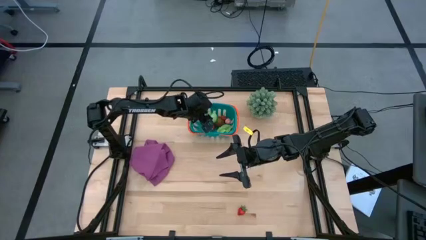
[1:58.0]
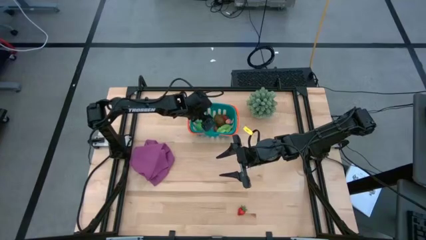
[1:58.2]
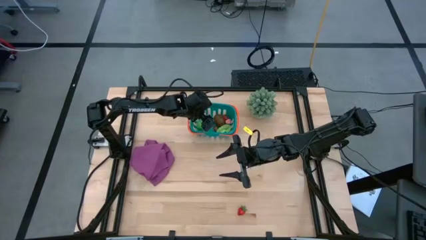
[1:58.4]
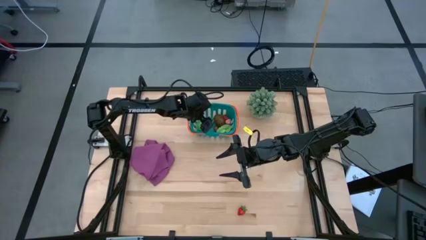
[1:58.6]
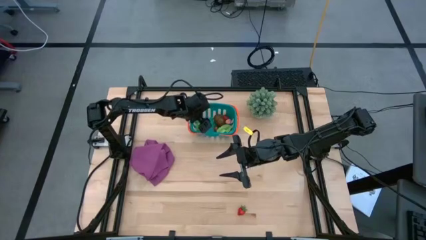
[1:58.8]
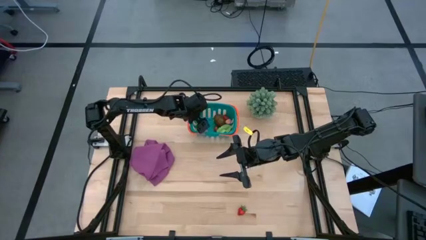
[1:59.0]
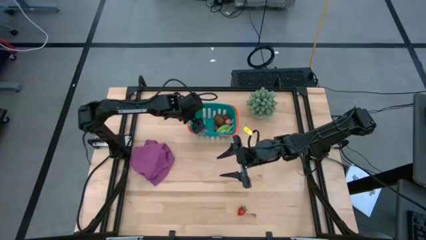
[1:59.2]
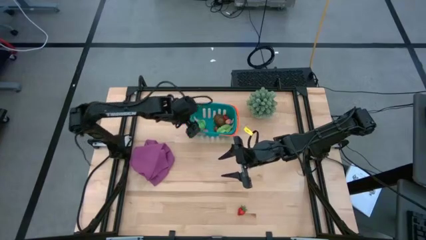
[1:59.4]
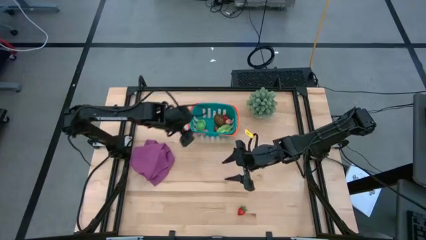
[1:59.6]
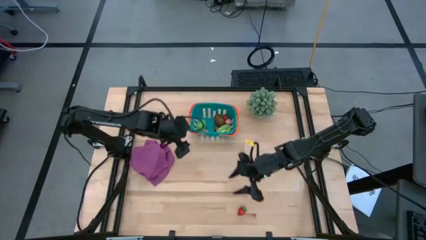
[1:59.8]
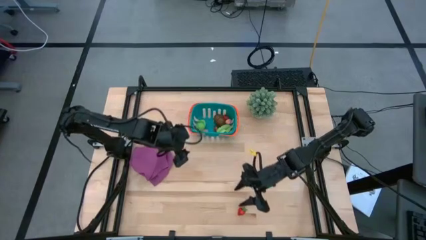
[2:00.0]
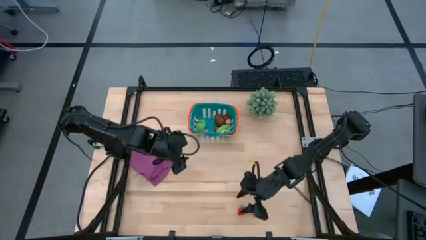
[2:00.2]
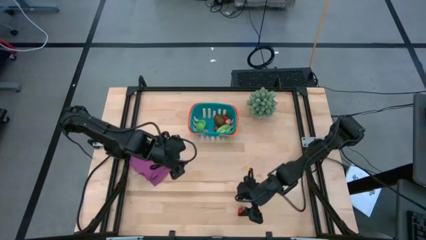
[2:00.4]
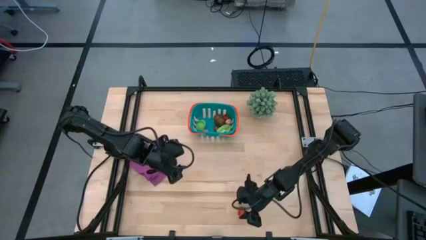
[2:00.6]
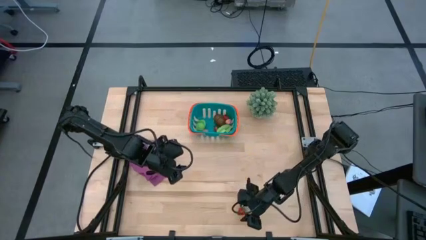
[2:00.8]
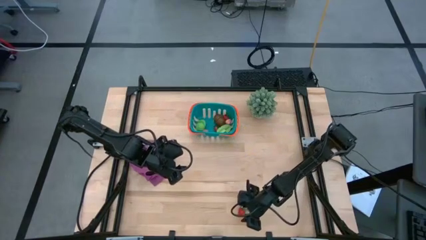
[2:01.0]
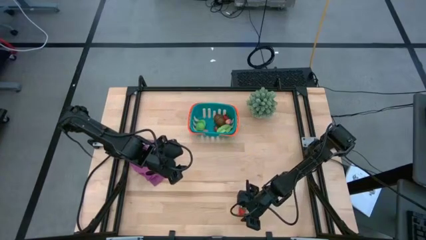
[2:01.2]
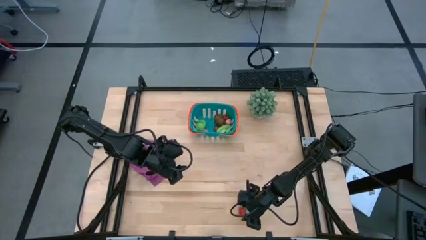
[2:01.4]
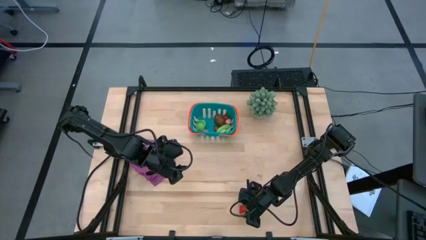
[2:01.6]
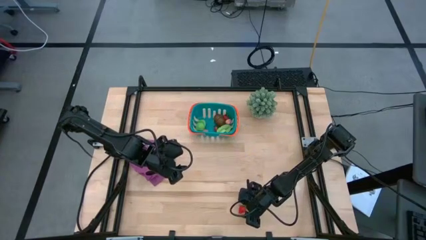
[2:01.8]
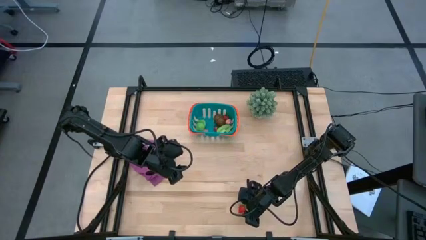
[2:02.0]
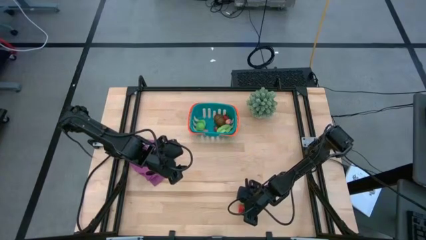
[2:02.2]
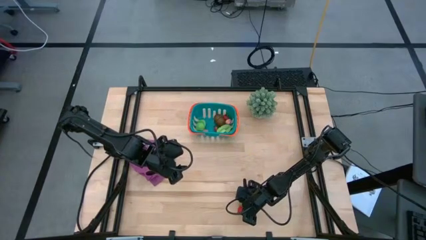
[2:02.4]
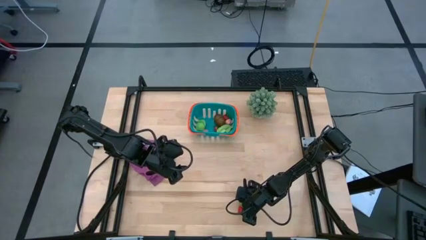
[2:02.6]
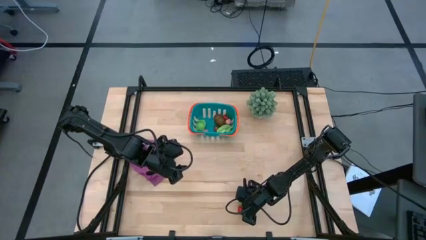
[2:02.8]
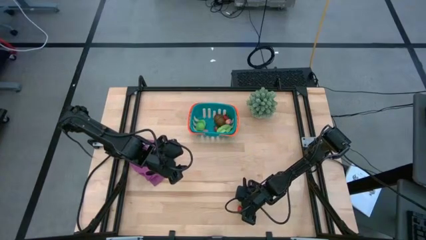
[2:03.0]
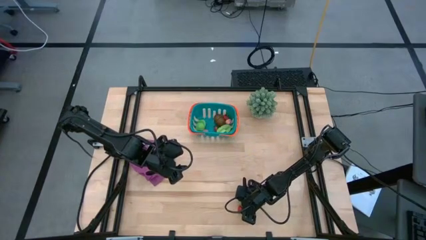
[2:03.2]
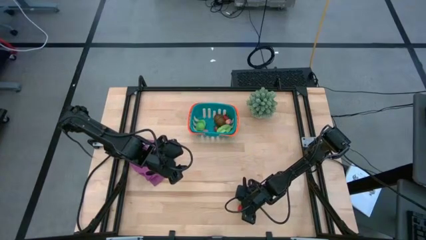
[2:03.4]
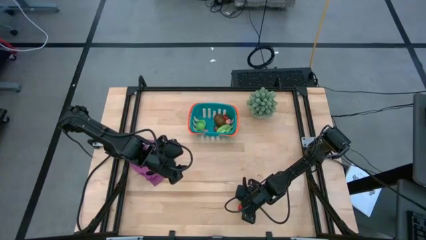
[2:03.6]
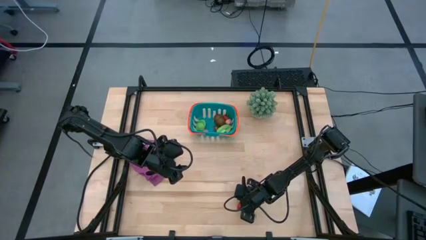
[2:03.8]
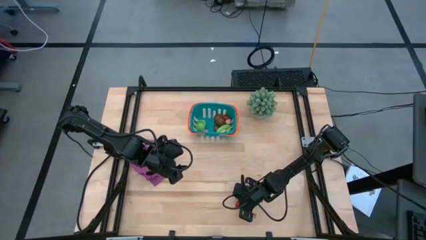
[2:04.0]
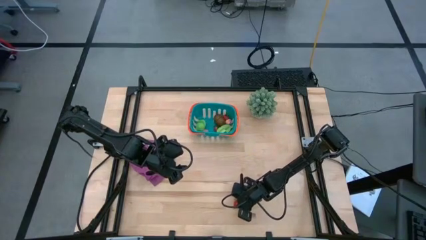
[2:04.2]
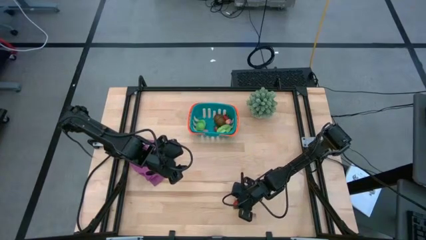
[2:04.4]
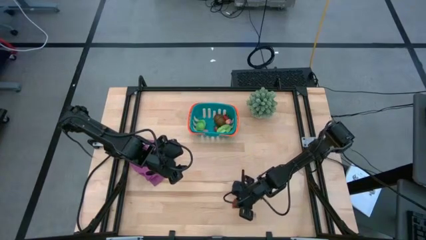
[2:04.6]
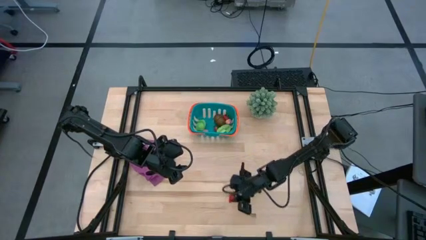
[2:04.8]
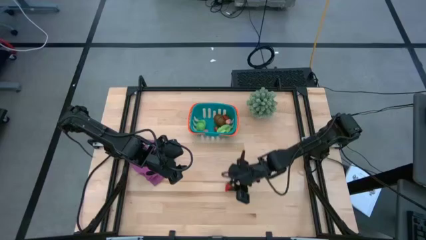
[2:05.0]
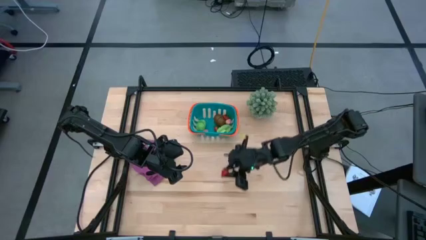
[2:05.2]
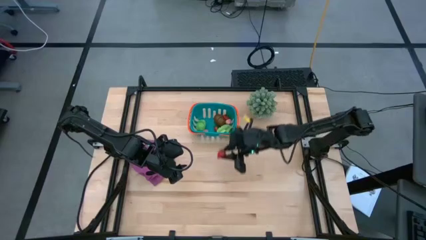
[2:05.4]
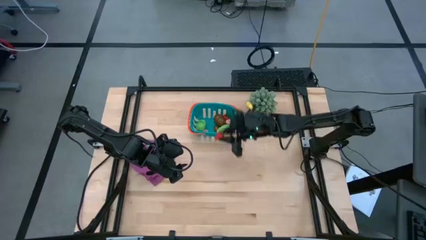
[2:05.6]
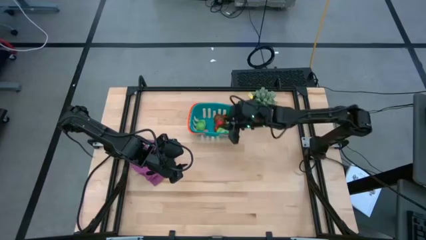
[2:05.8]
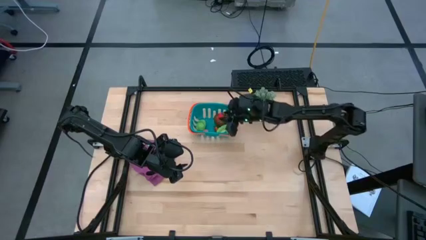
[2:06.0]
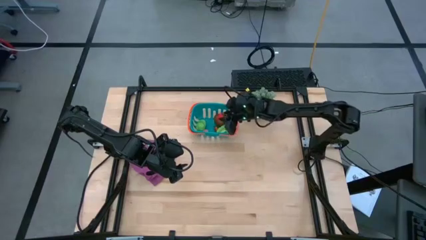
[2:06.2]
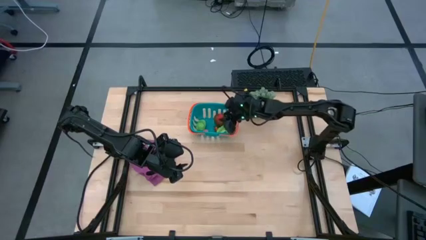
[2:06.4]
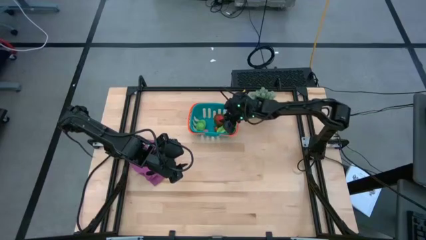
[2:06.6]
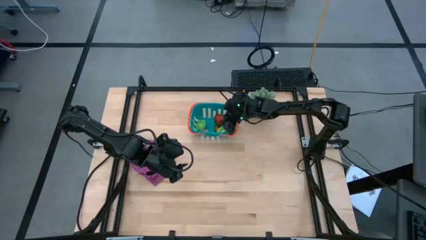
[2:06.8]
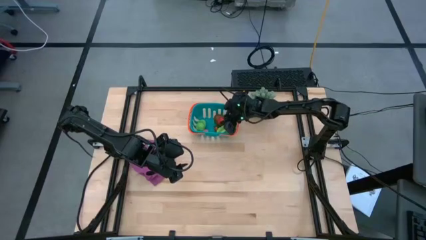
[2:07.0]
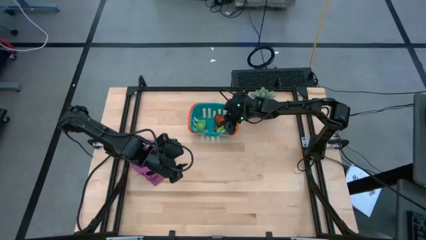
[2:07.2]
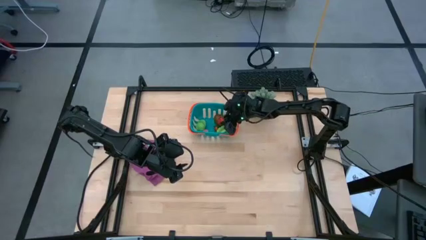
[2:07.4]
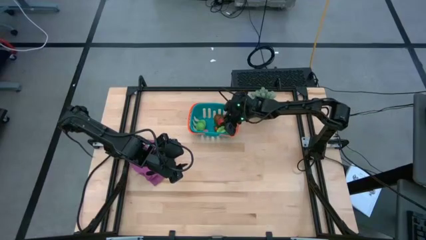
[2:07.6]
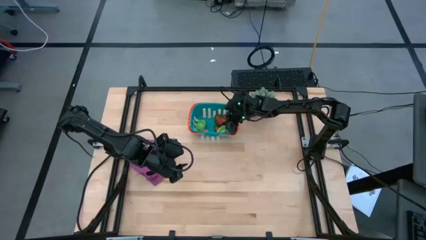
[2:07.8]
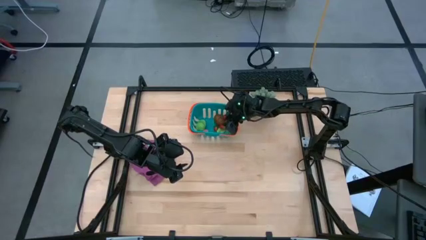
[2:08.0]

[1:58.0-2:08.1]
Task: Pick and placing Produce into tupperware
Put the red strawberry into the blue basket

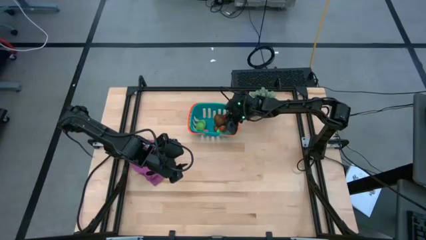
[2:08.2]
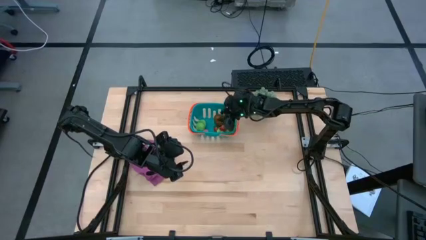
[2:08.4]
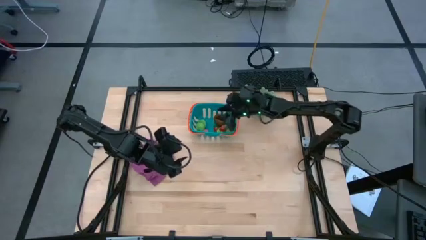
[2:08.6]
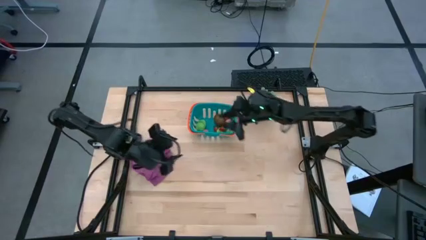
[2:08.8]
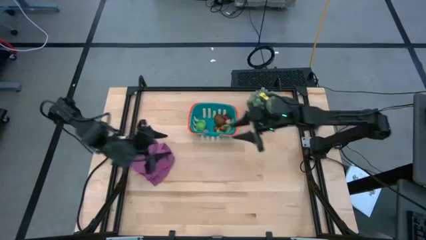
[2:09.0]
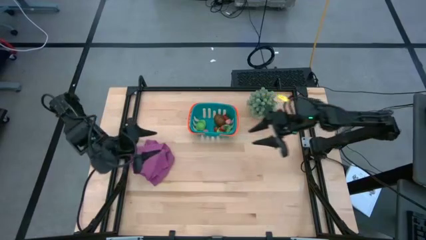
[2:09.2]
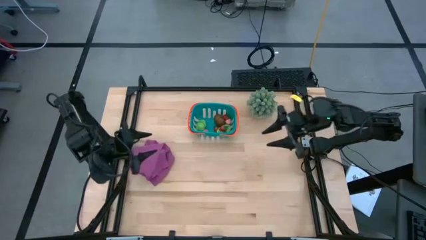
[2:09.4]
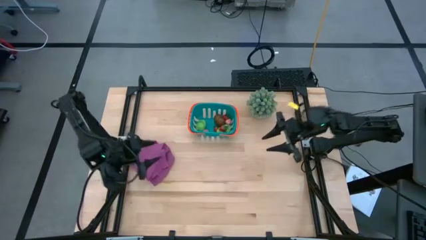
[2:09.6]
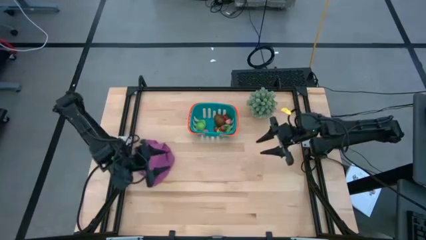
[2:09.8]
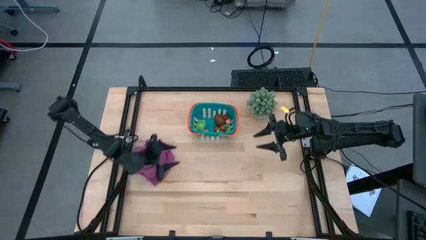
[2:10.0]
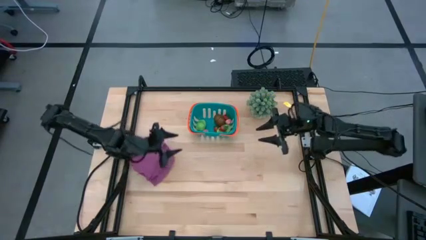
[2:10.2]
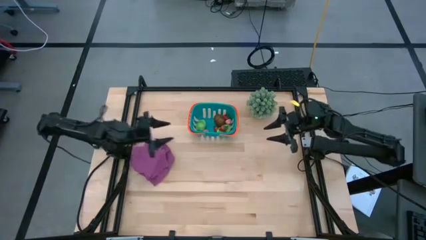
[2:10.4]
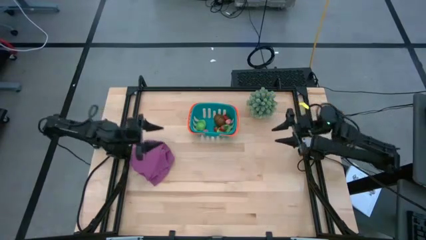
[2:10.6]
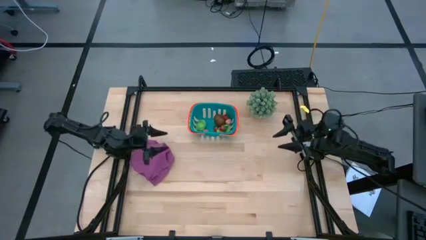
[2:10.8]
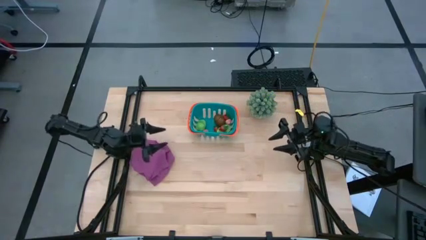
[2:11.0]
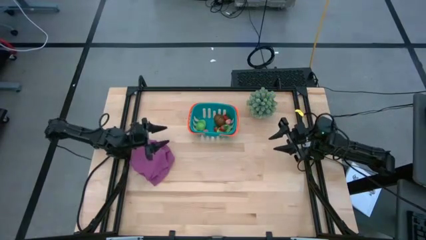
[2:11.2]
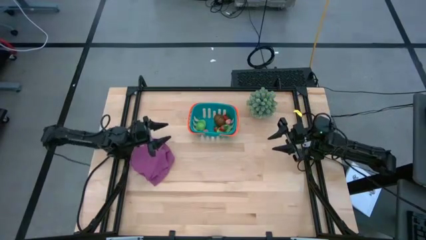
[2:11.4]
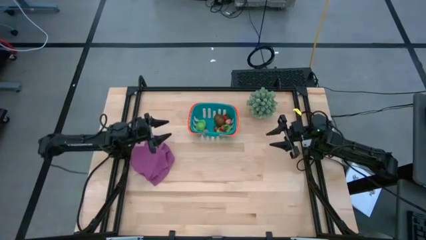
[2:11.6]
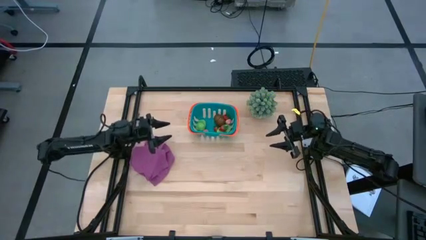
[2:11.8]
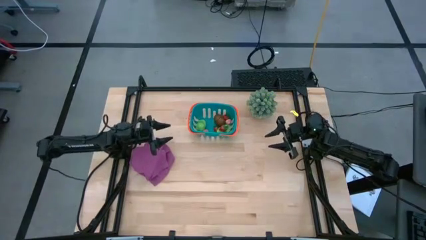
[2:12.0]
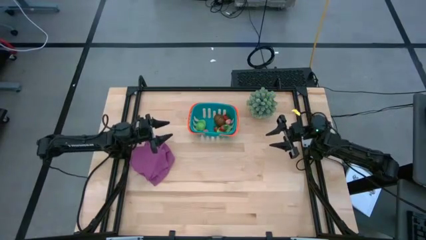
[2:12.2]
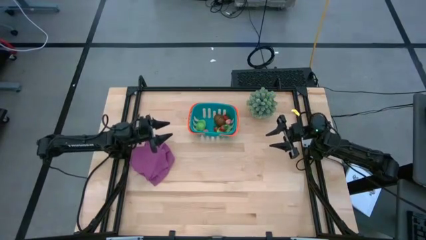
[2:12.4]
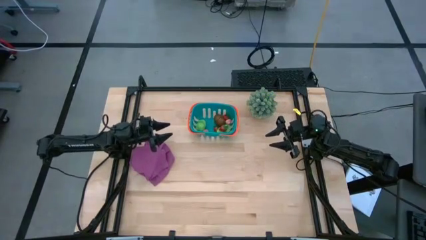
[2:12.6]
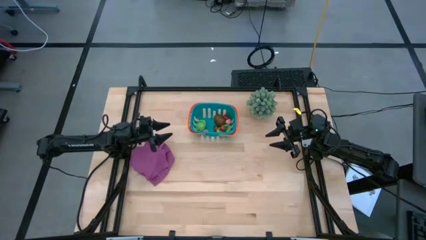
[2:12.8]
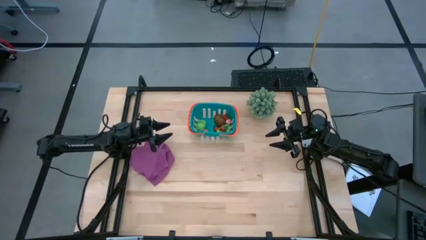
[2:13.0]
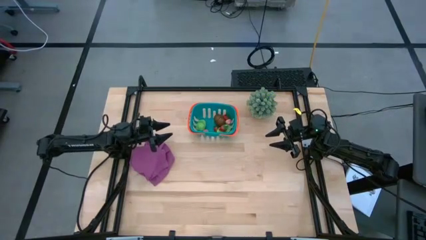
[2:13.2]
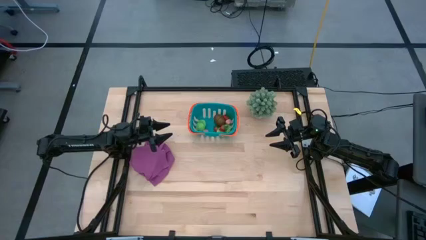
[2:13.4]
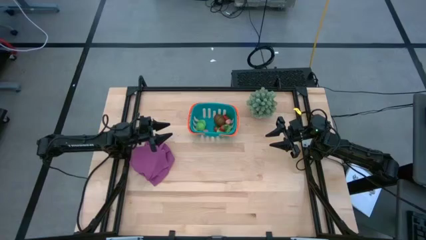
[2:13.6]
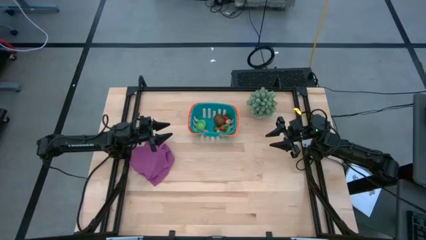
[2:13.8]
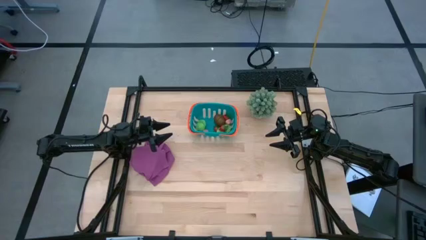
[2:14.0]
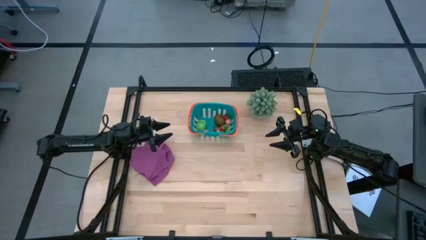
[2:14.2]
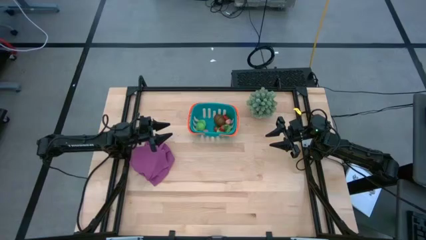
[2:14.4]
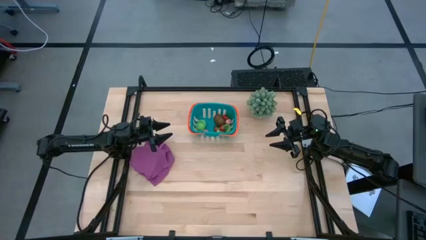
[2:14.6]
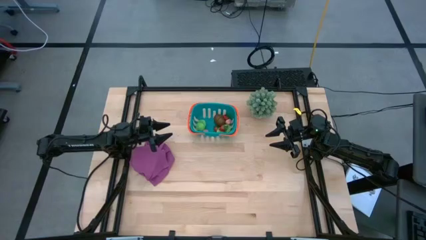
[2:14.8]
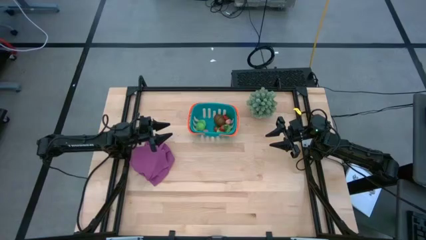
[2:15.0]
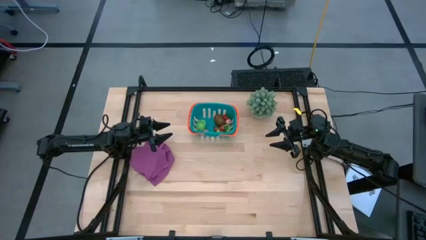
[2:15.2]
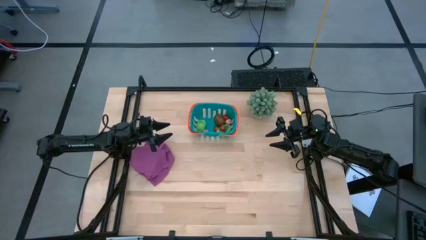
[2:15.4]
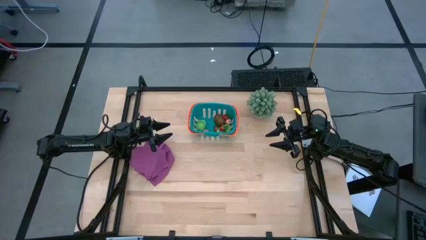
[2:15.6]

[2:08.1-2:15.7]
Return to Home Position
